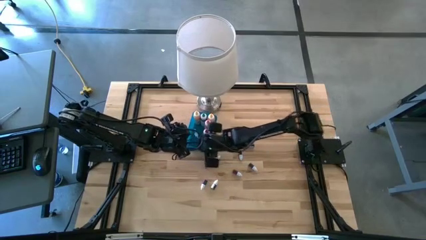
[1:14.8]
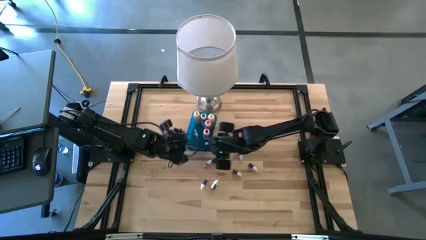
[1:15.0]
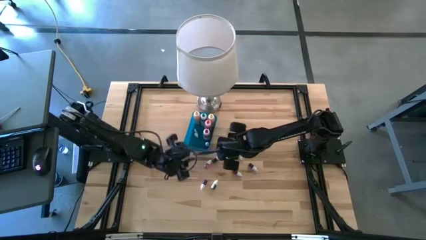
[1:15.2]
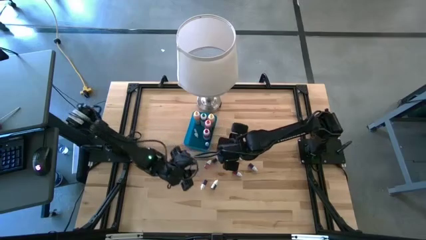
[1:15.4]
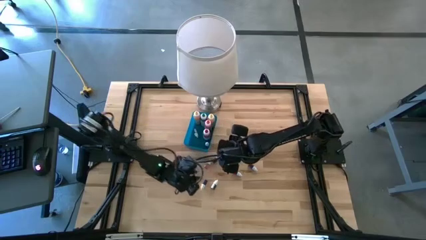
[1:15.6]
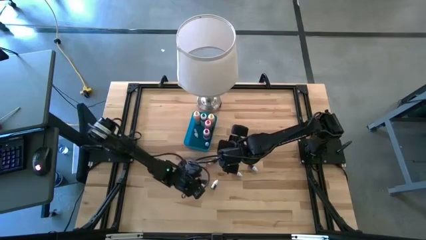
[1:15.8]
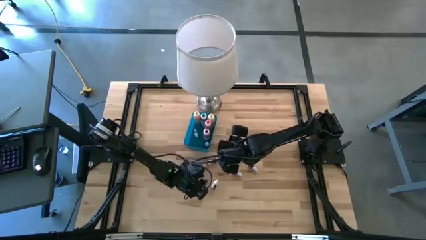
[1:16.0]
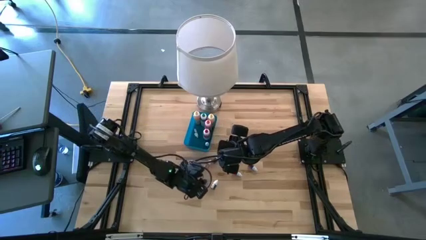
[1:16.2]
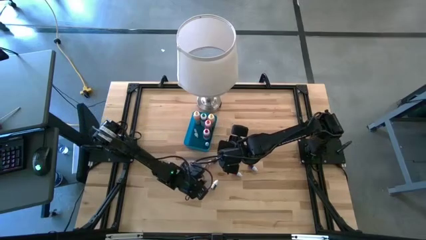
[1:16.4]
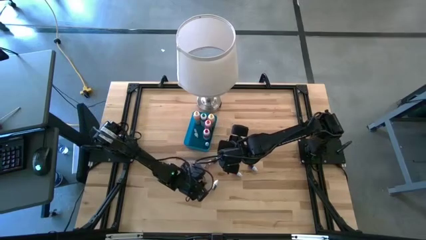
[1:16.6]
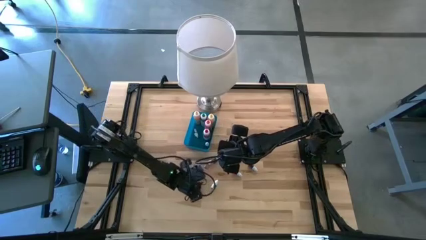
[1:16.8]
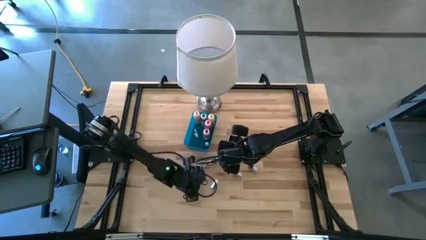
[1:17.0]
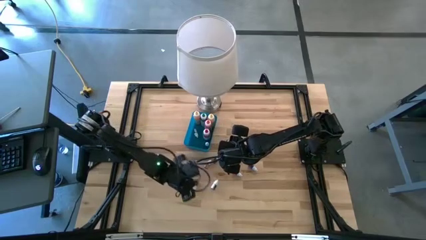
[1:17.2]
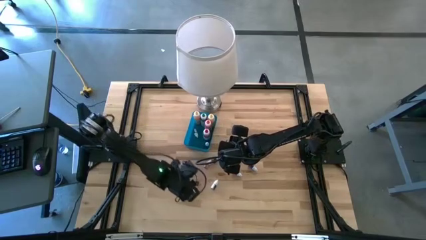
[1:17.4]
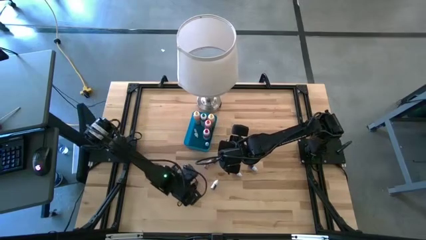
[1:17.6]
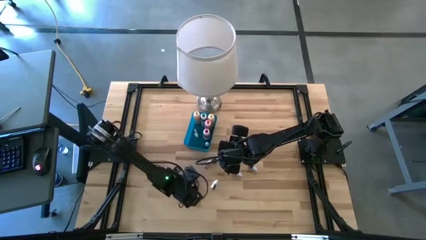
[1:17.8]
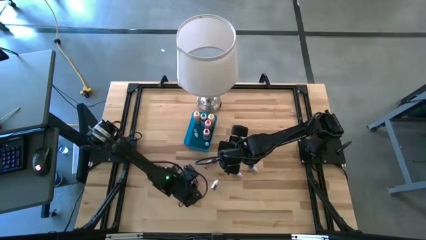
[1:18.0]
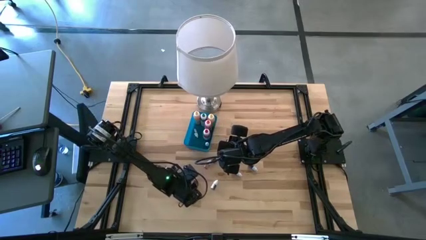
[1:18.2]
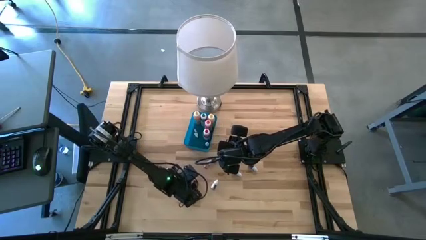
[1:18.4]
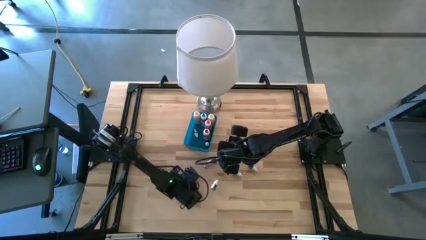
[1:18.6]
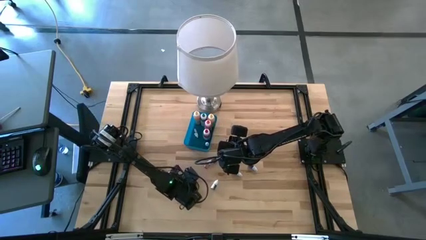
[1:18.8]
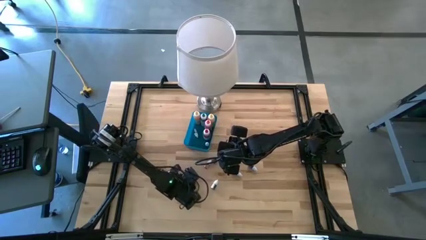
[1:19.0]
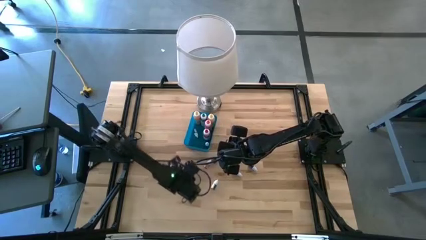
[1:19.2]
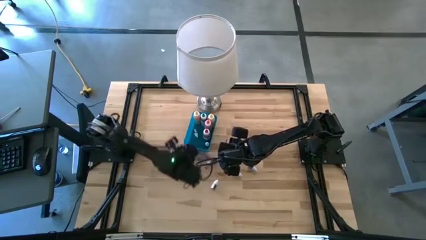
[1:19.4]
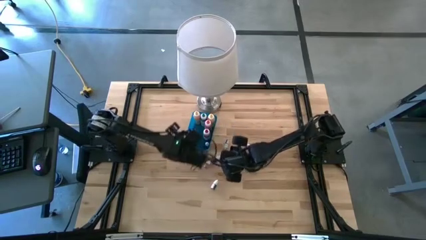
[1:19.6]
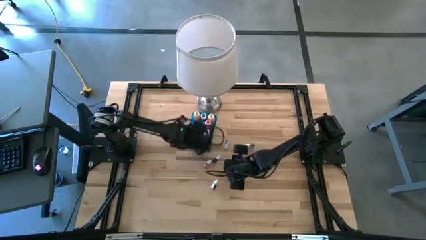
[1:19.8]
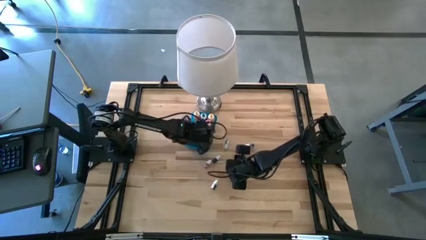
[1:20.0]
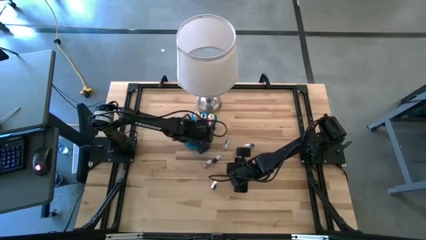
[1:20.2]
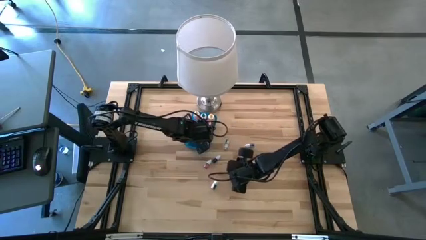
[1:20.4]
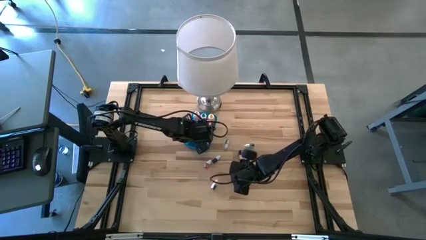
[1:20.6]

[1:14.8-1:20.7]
Task: Pick & Place food coloring
Put the small pink food coloring bottle into the blue bin

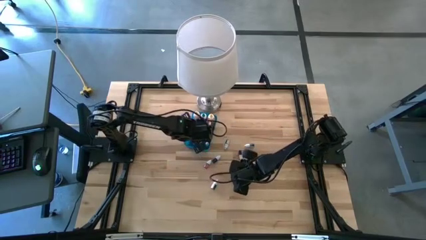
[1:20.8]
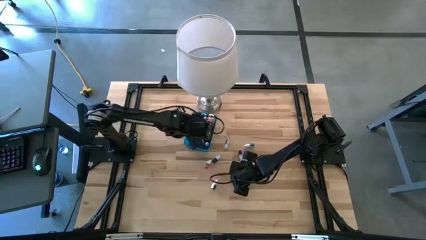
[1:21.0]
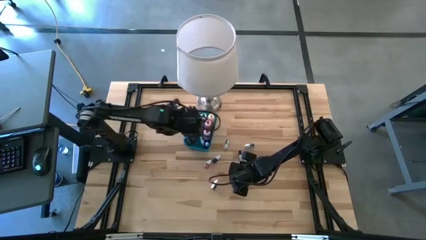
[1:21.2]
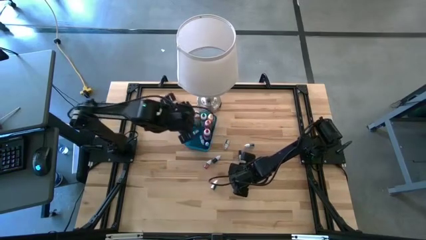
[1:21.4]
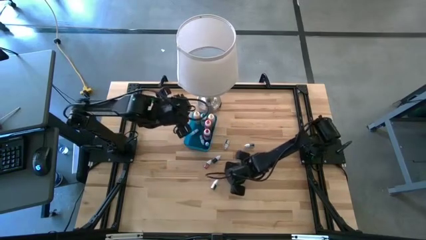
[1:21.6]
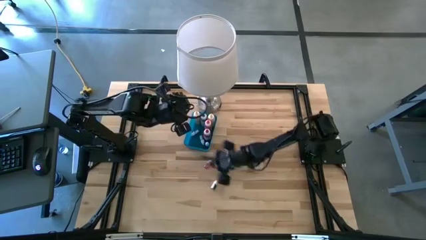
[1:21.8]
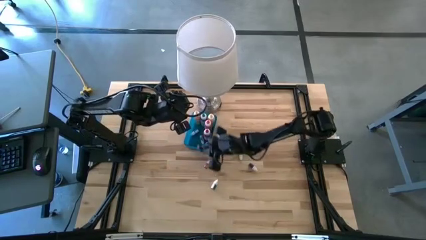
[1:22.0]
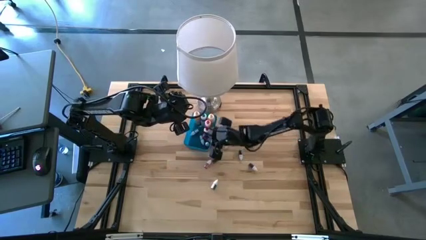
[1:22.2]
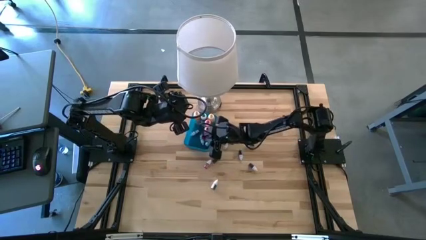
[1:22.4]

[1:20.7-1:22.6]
Put the small red food coloring bottle into the blue bin

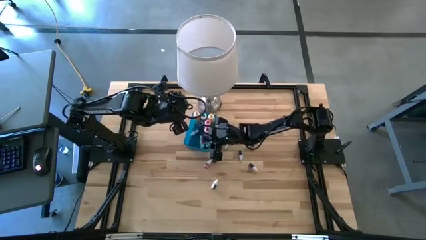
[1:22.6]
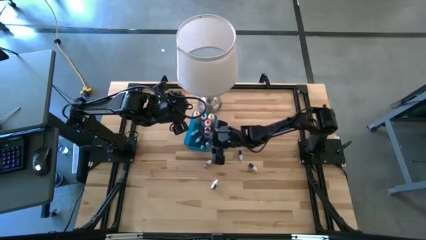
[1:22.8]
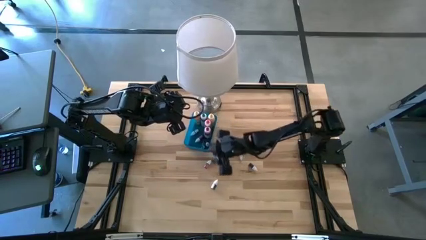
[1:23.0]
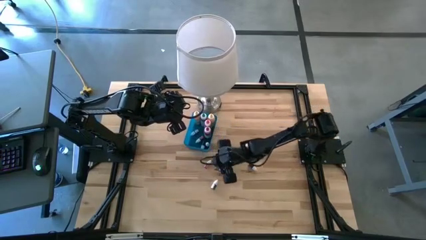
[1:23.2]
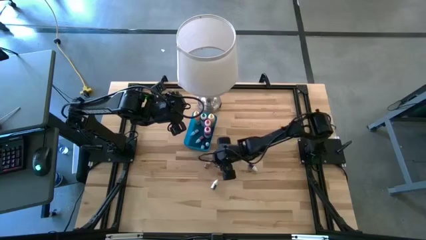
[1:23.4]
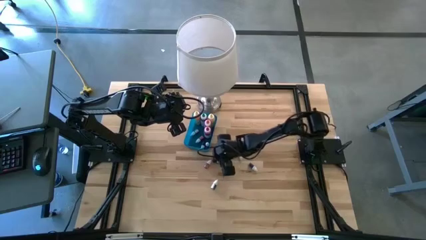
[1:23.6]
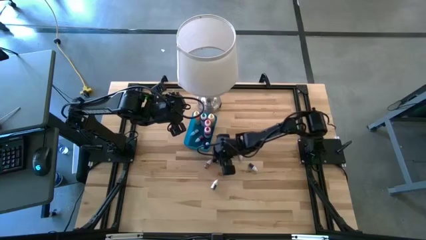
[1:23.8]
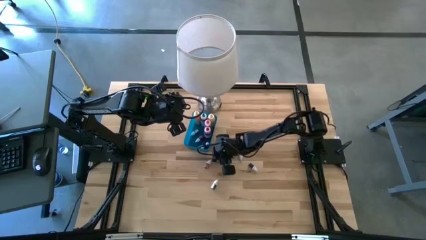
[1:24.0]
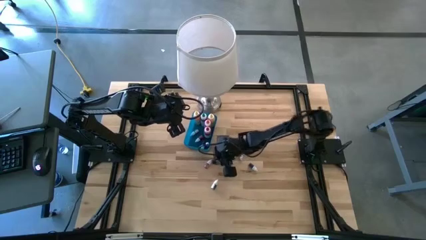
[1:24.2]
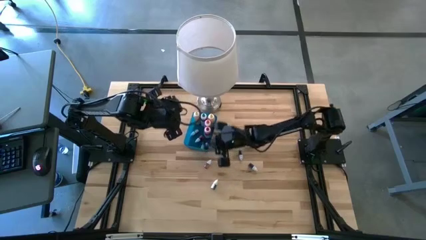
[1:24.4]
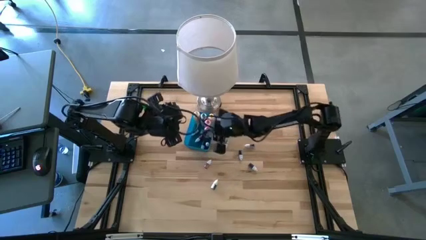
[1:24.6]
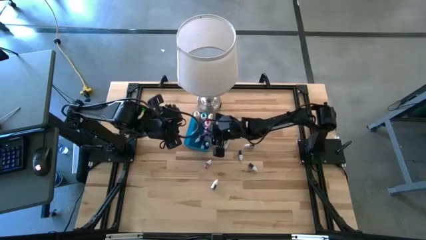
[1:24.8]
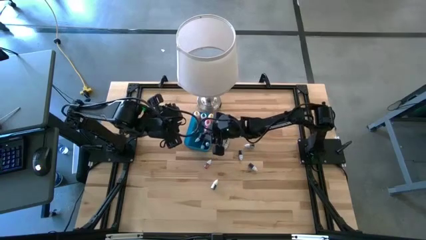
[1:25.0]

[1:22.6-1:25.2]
Put the small black food coloring bottle into the blue bin

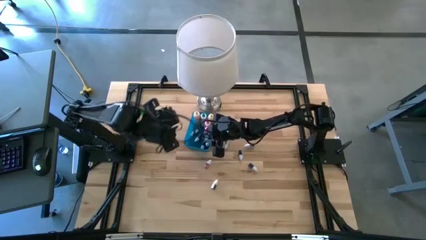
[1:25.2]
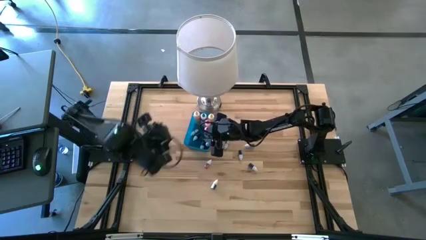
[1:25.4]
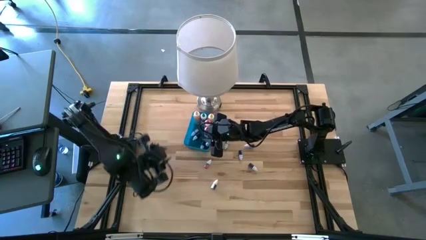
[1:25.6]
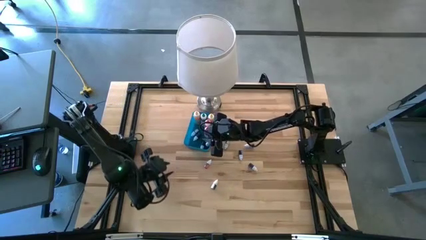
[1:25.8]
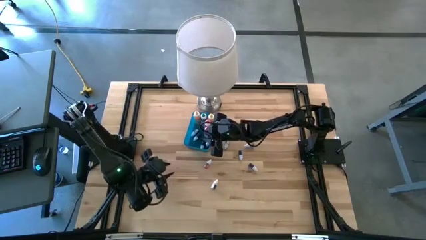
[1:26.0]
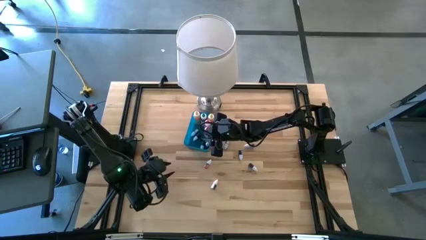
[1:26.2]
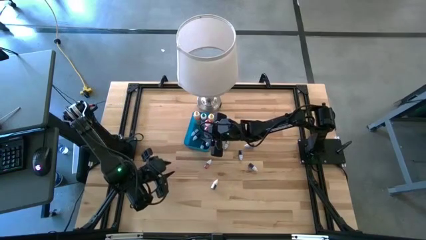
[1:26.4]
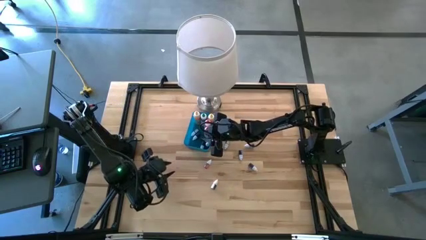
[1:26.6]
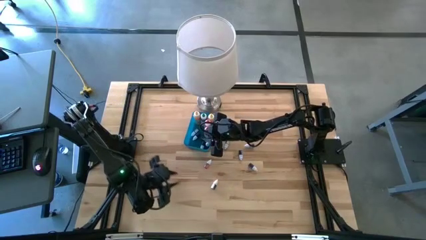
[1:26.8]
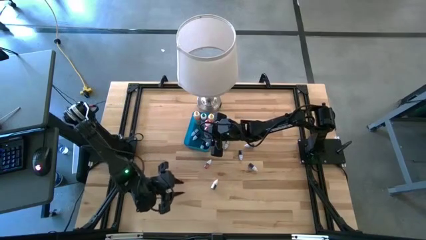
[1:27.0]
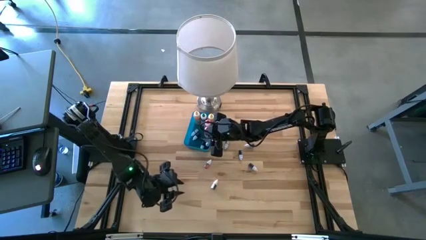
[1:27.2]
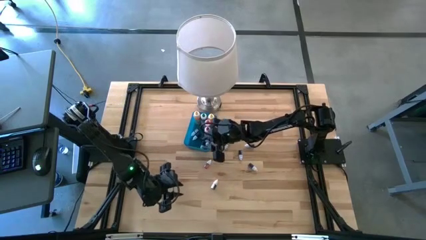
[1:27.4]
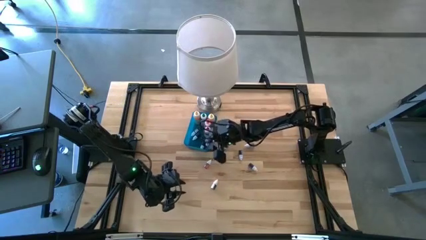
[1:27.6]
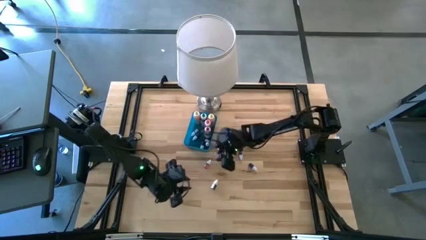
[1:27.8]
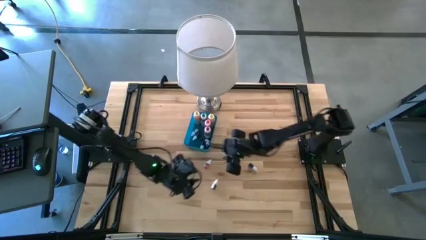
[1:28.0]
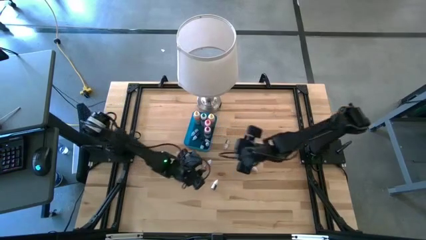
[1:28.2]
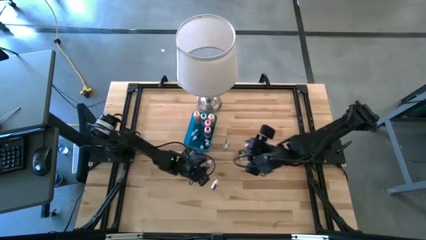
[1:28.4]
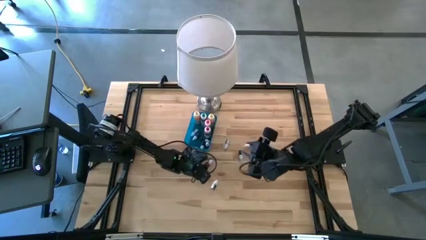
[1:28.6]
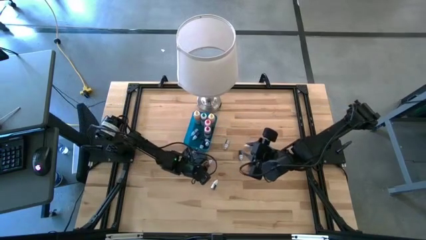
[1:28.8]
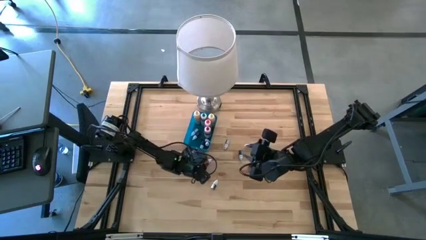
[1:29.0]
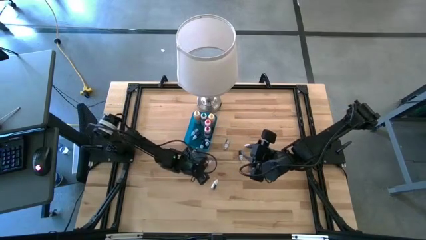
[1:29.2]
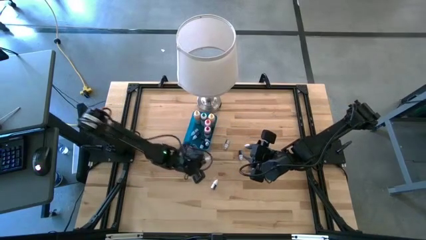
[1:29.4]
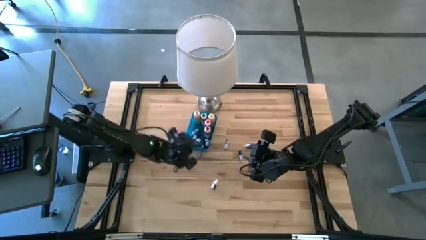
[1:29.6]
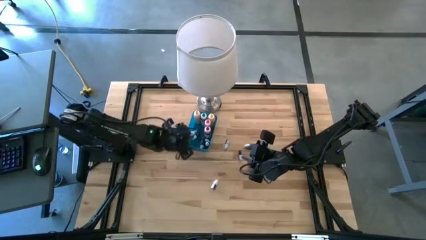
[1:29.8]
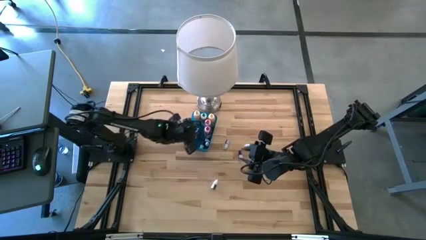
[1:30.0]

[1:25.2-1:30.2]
Put the small orange food coloring bottle into the blue bin
